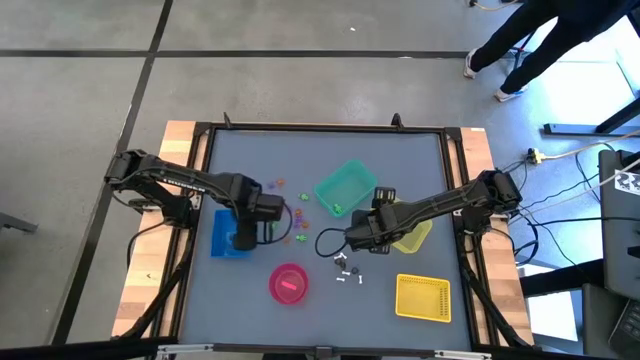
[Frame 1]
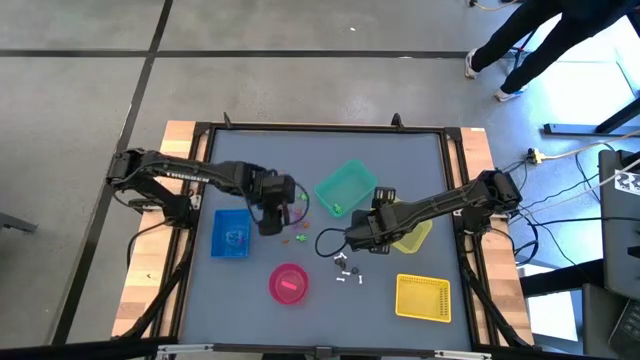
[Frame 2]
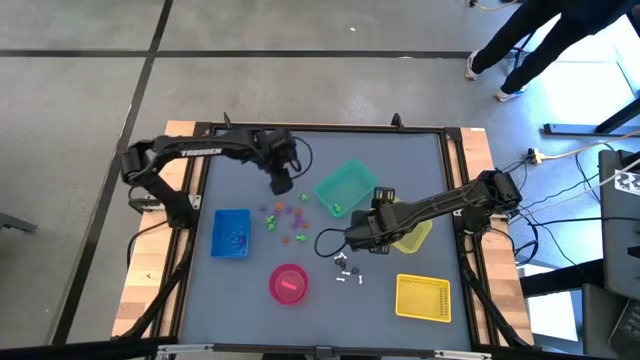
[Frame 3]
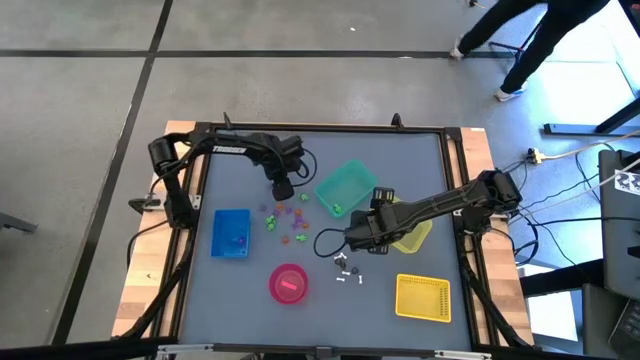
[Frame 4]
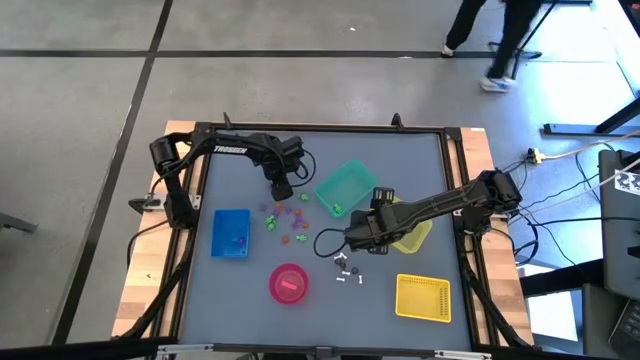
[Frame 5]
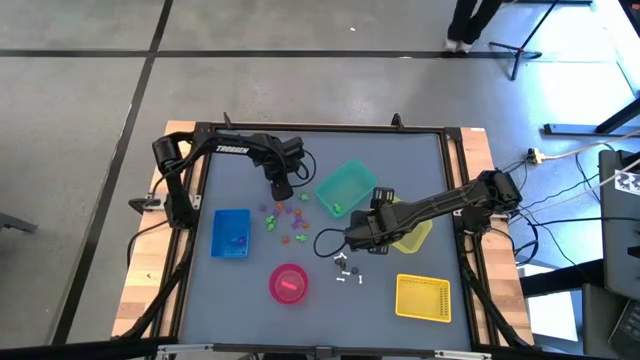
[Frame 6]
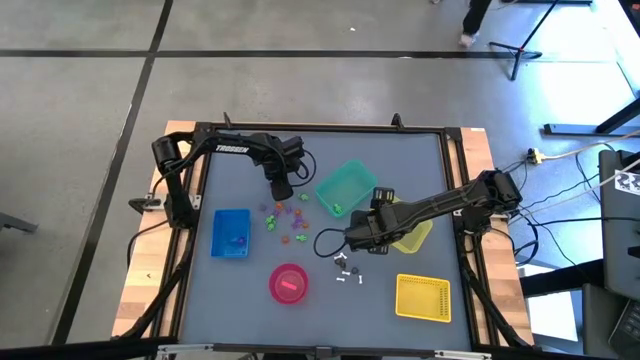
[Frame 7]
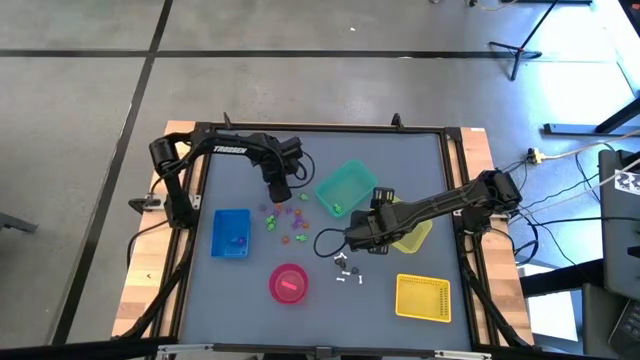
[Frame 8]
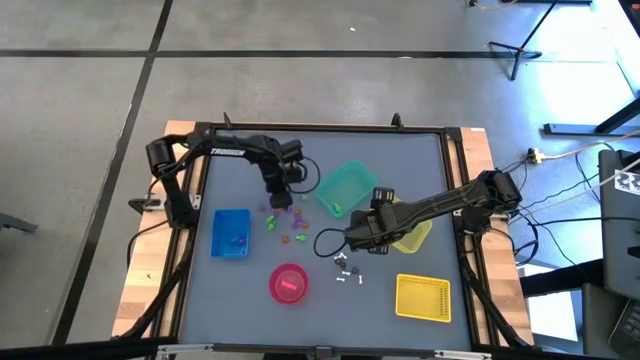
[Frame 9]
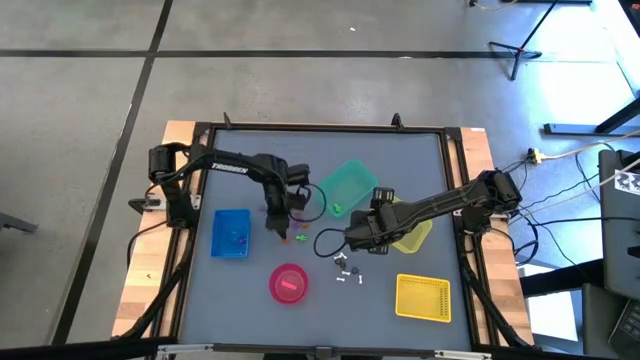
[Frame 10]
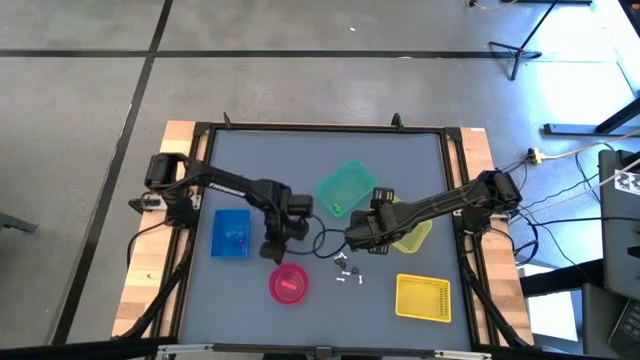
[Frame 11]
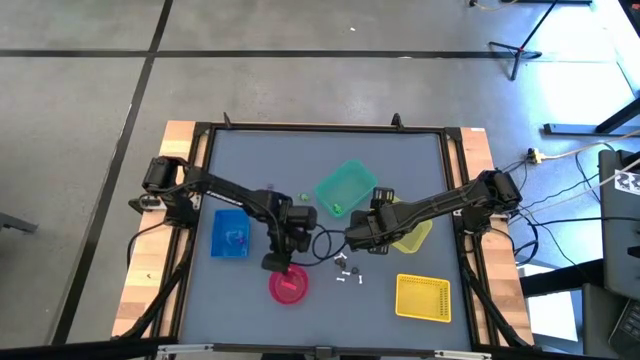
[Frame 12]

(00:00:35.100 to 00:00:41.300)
Task: Sort Halloween decoration
Put the orange pumpkin toy into the pink bin

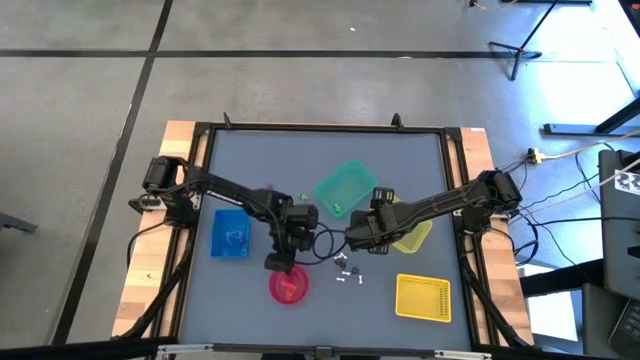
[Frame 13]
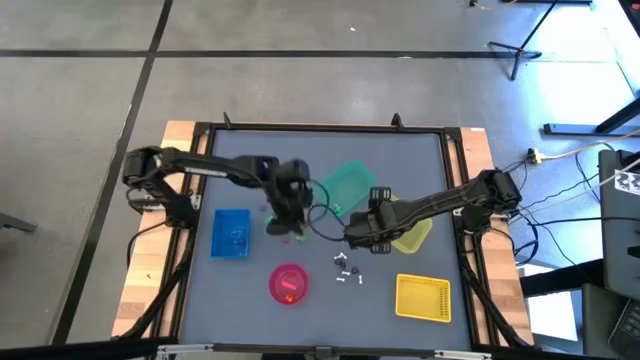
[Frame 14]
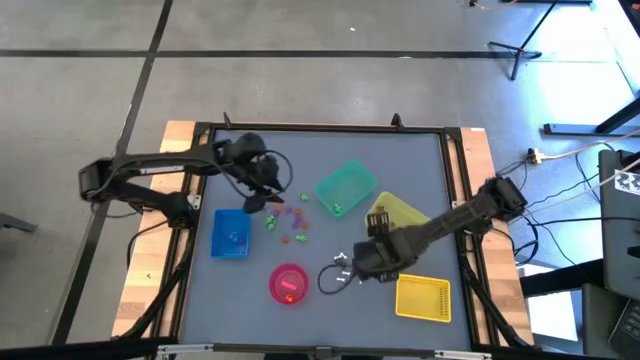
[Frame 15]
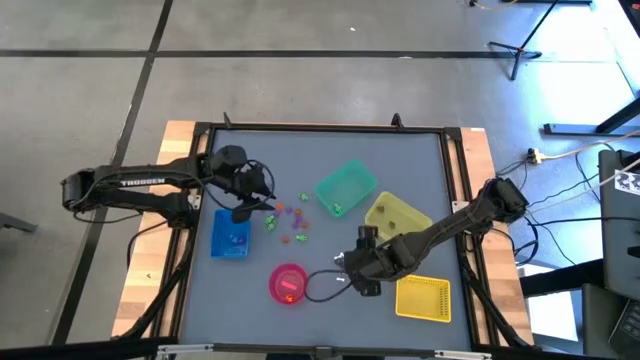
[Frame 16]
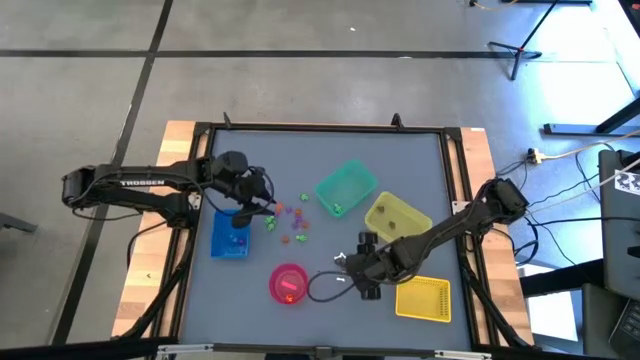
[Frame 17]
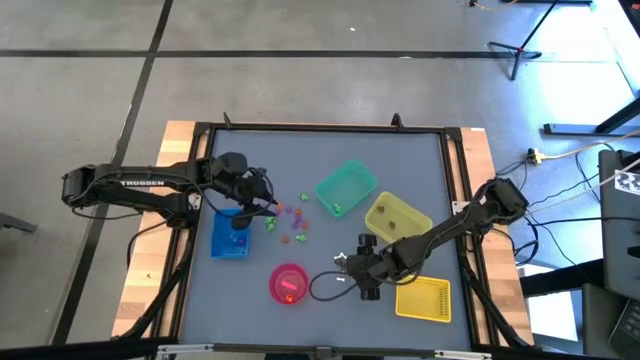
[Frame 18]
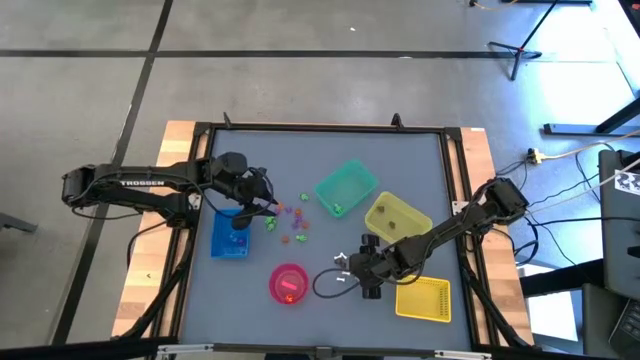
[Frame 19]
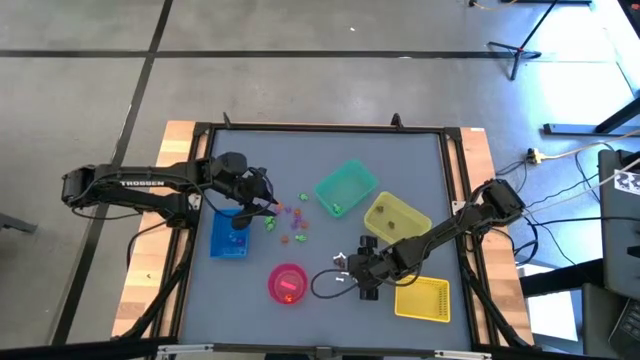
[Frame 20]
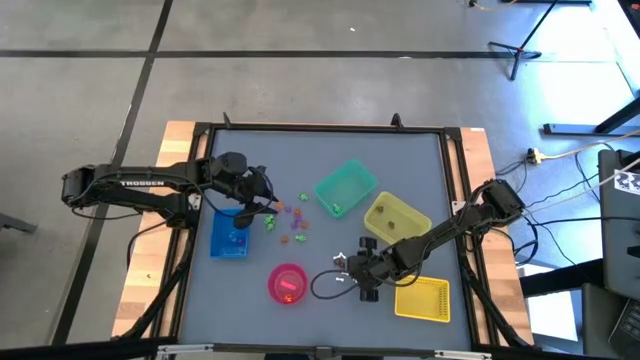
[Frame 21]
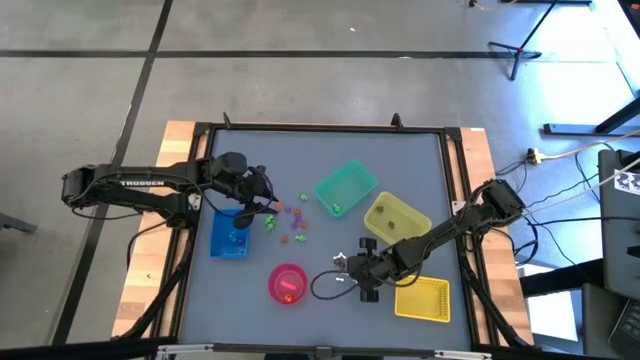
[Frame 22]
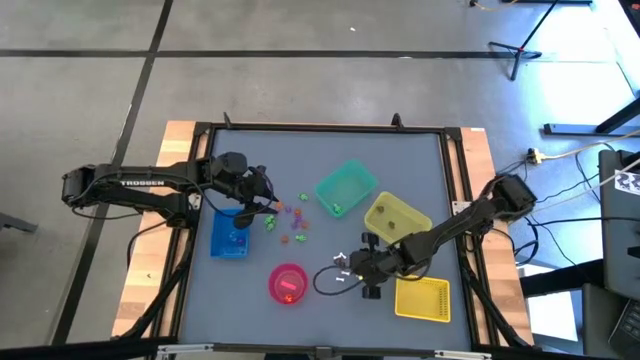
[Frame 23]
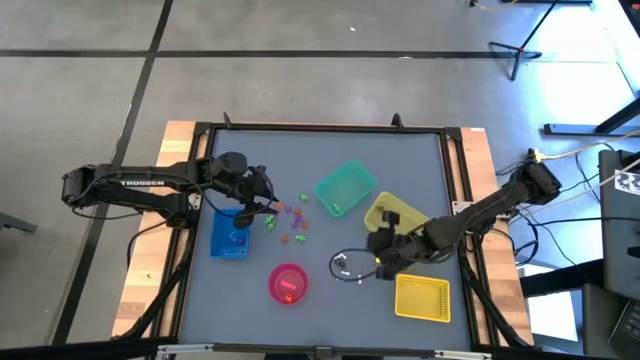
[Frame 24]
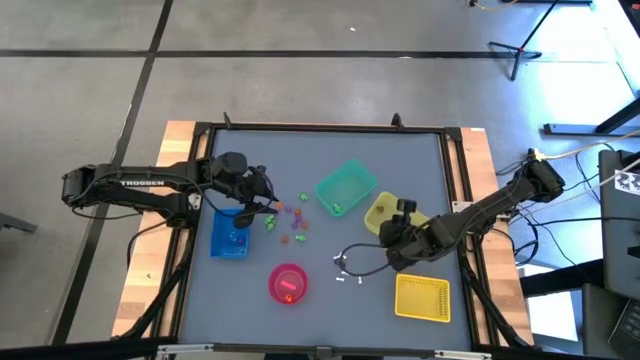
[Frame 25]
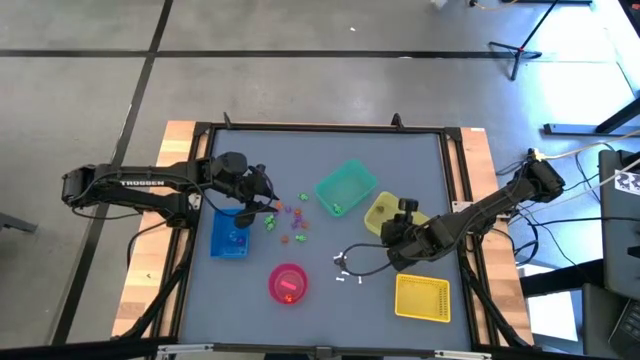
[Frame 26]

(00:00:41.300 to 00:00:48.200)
Put the black skull toy into the light yellow bin

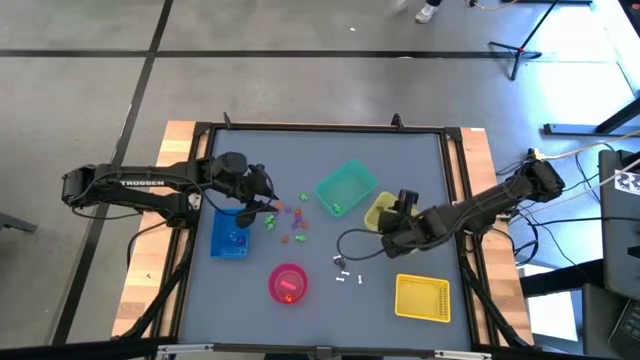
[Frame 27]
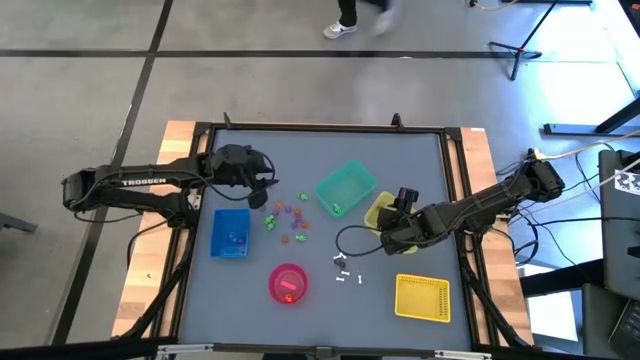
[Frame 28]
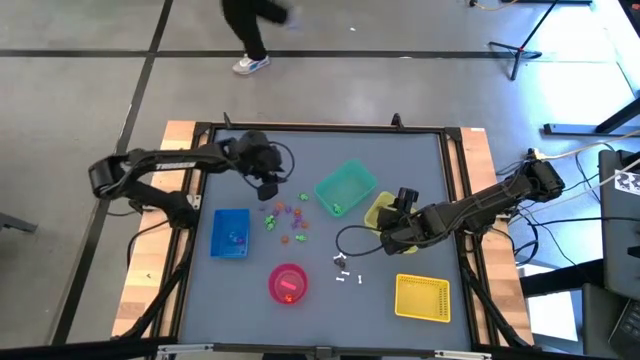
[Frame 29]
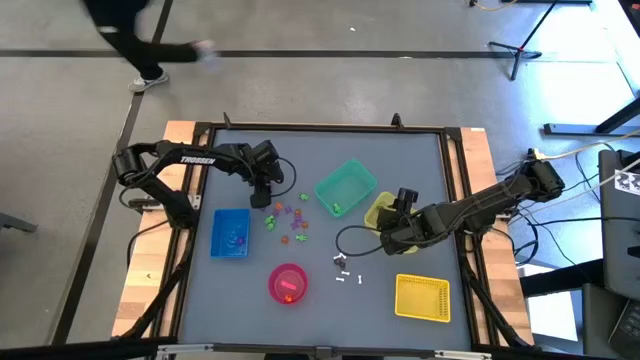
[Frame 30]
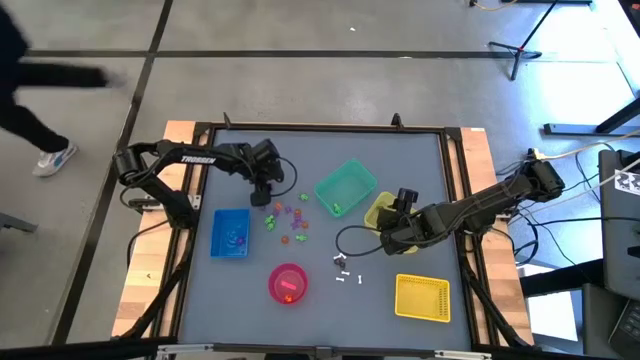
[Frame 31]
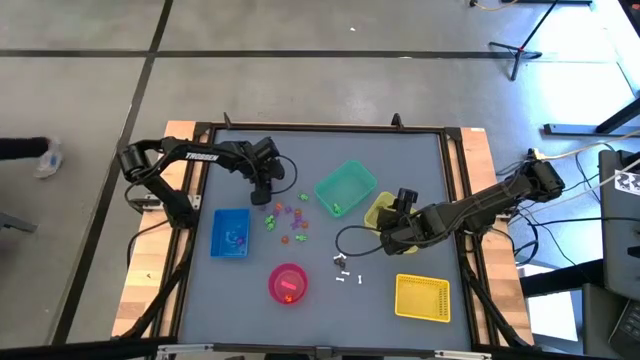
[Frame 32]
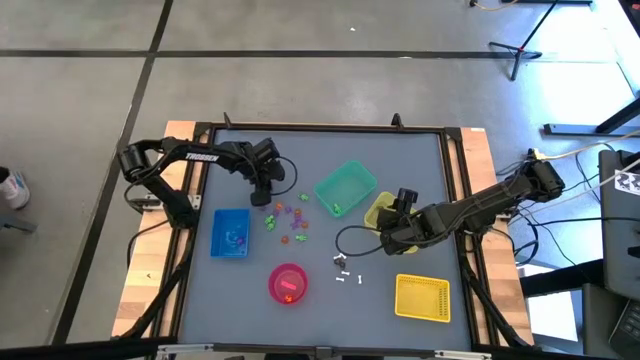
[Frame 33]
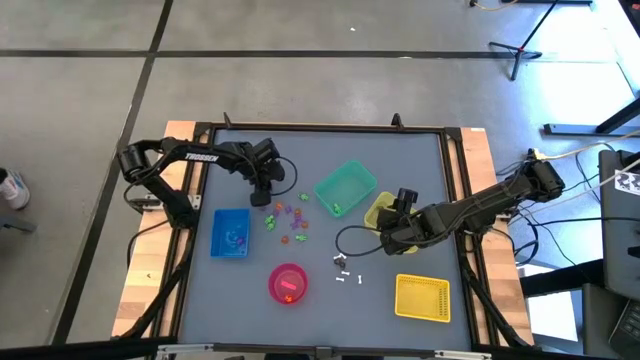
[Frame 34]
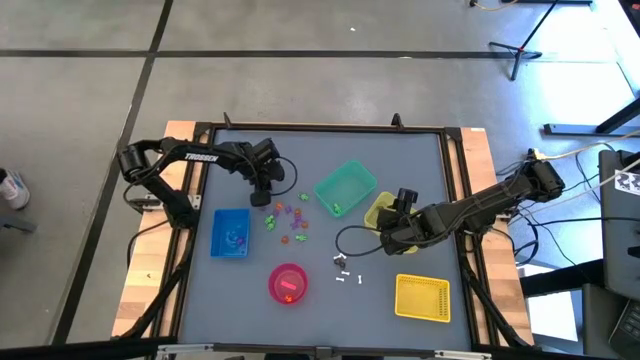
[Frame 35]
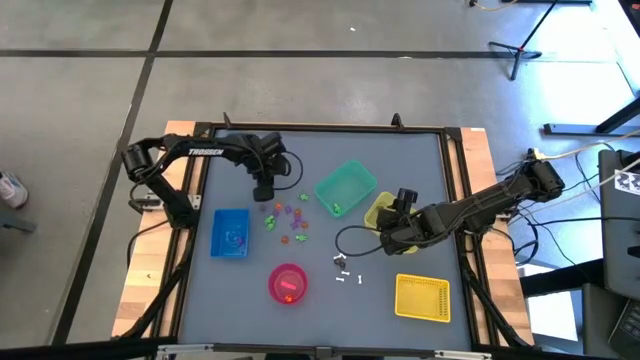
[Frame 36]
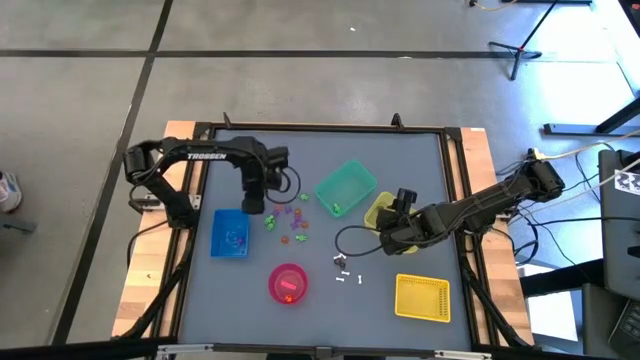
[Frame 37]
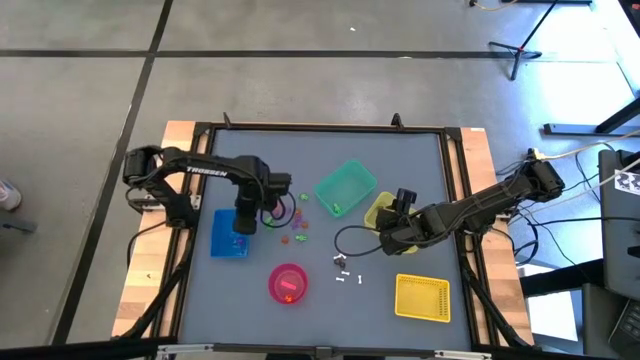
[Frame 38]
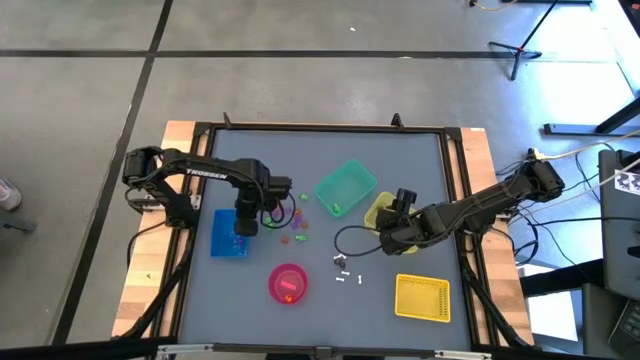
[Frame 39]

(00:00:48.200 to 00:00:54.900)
Put the violet spider toy into the blue bin

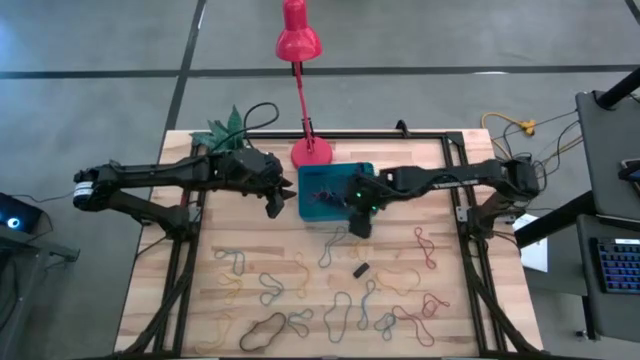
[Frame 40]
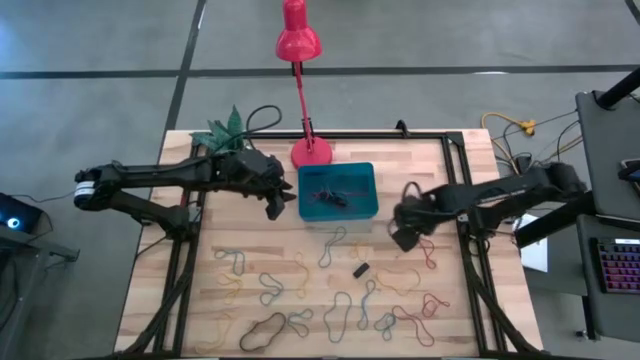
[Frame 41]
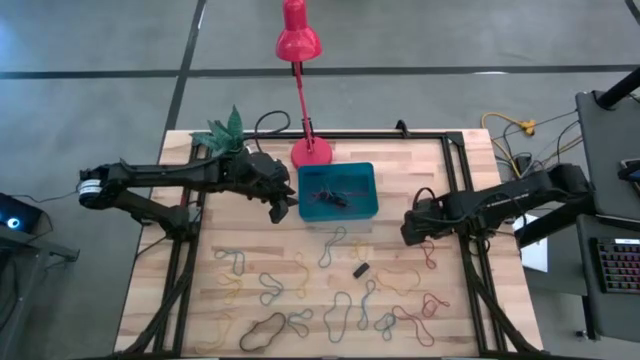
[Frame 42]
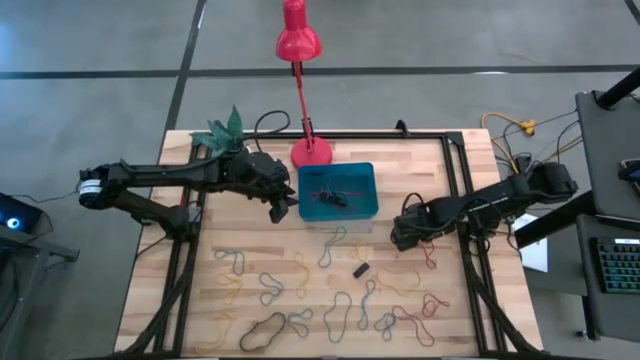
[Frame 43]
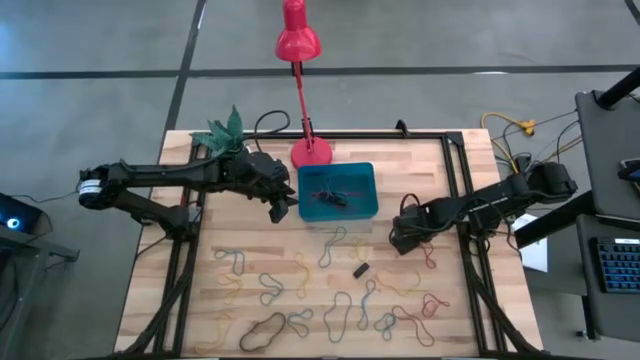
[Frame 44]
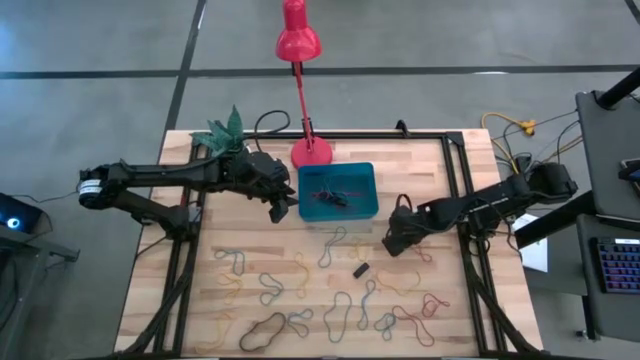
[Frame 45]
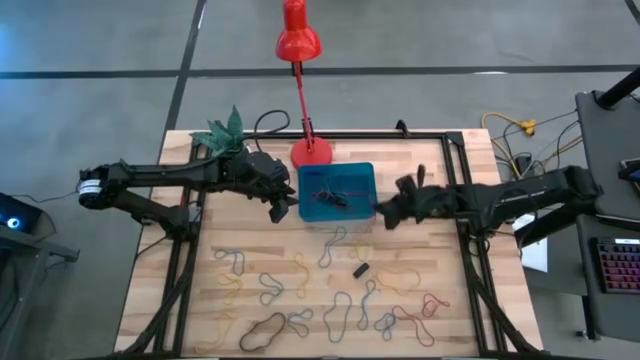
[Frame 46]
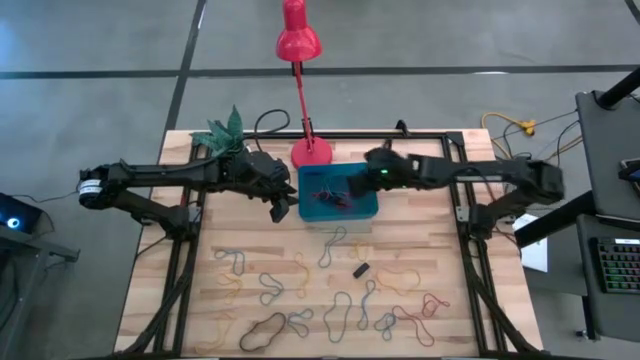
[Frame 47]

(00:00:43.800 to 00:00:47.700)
Task: Pick and place rubber bands into bin
Put the red rubber band into the blue bin
